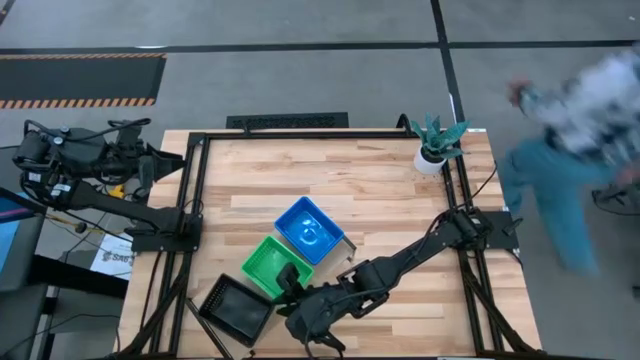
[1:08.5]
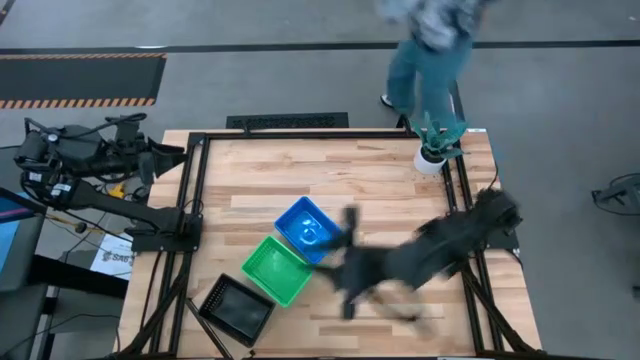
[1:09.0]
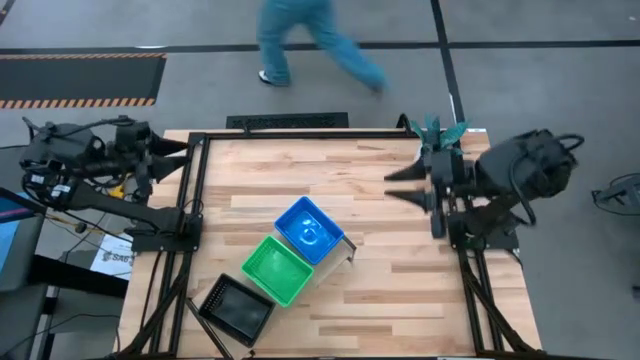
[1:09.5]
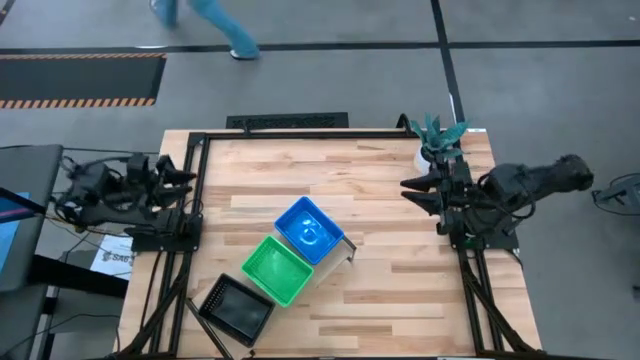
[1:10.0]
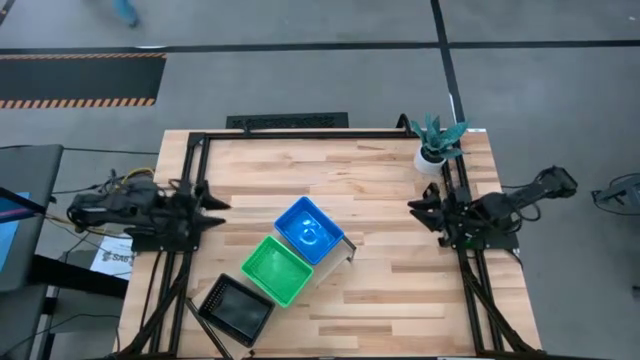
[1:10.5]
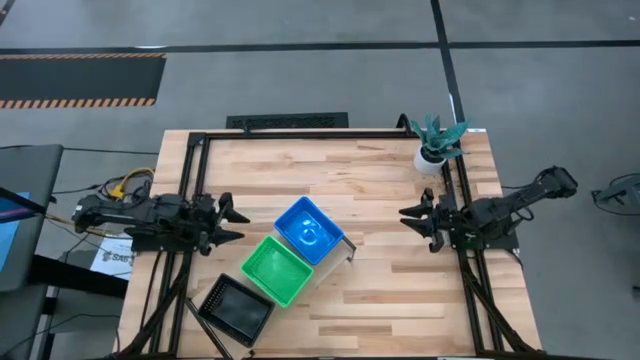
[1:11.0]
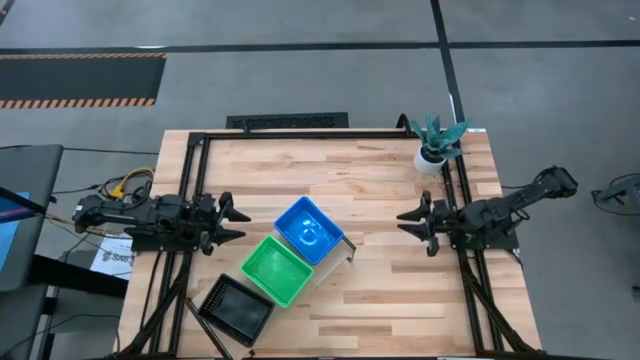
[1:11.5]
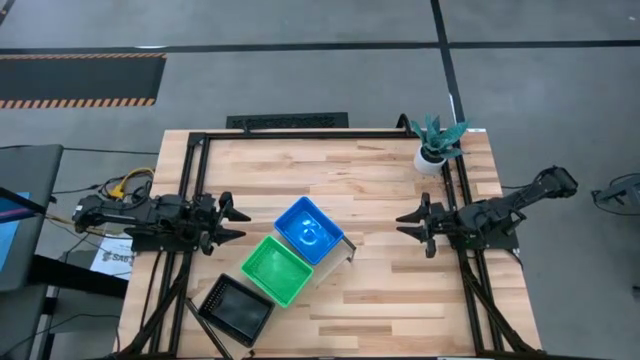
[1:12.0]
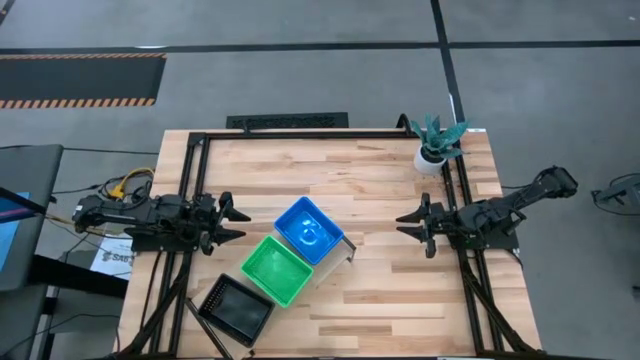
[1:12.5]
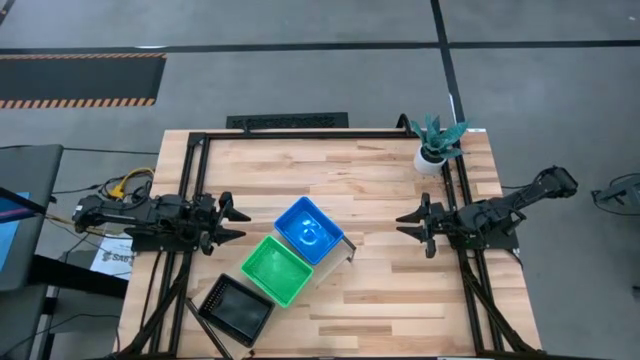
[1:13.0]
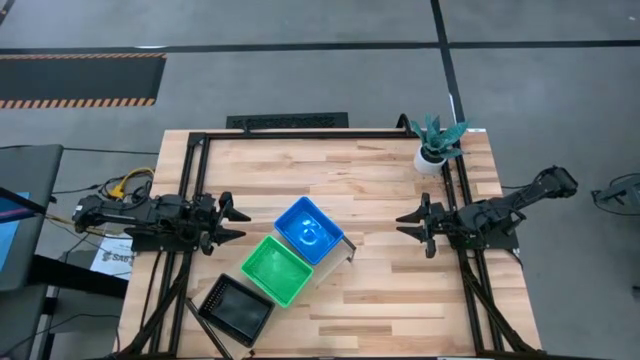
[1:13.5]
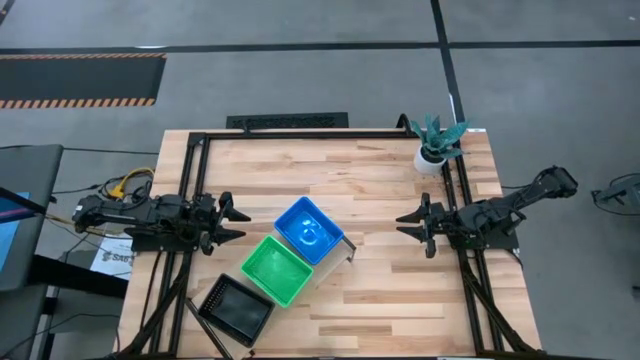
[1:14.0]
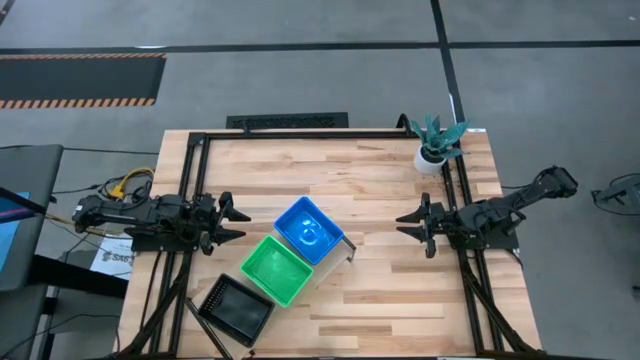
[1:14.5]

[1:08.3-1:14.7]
Task: Stack baskets on shelf by color
Return to Home Position

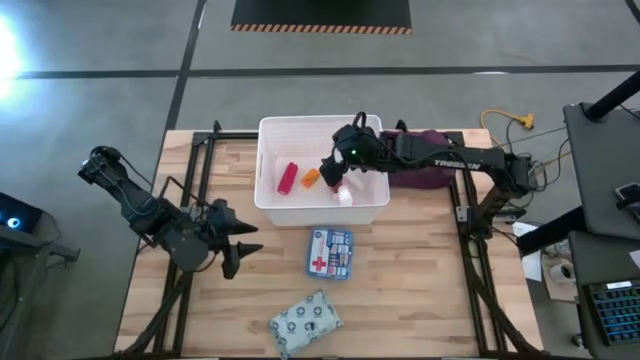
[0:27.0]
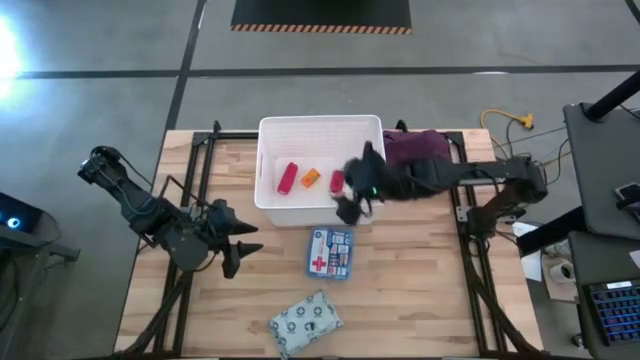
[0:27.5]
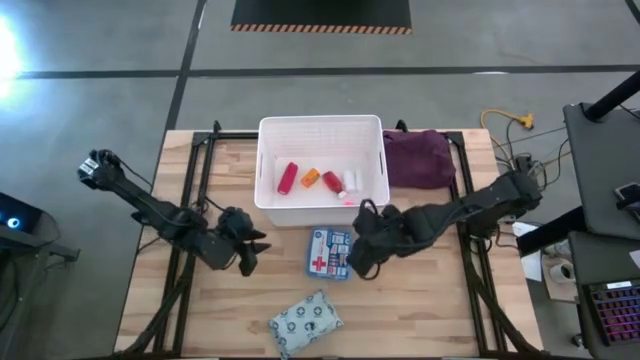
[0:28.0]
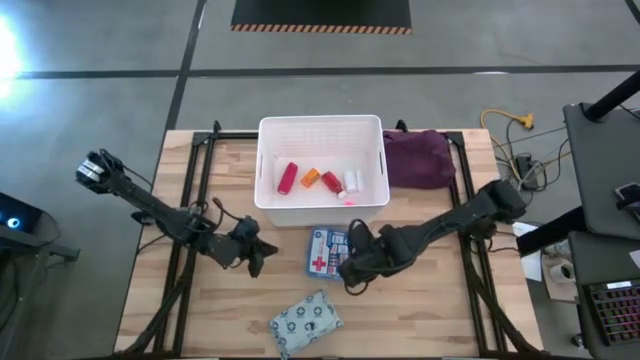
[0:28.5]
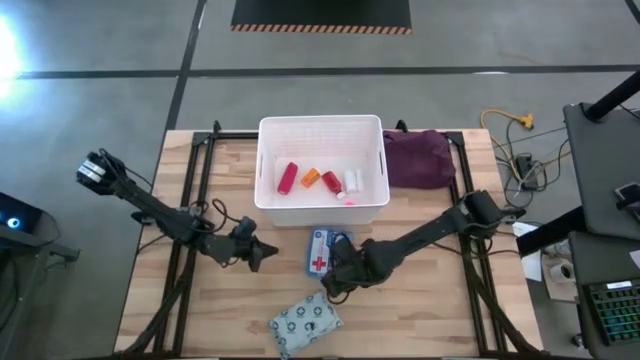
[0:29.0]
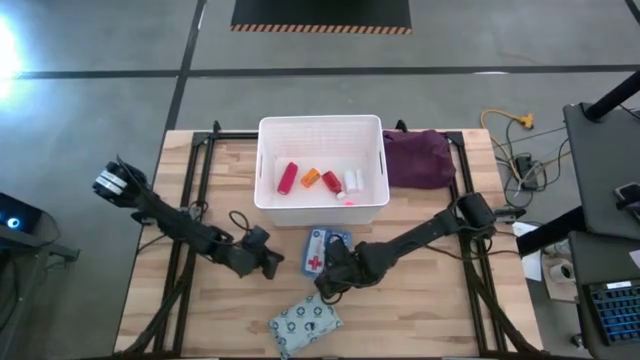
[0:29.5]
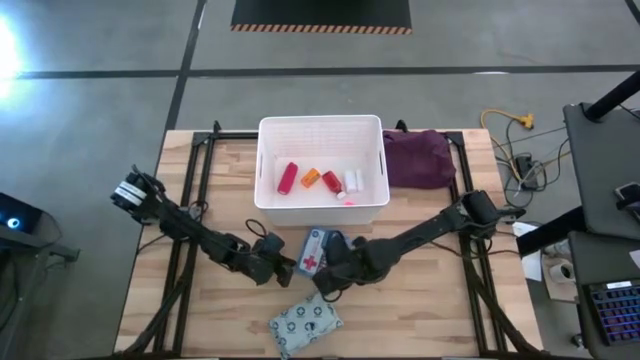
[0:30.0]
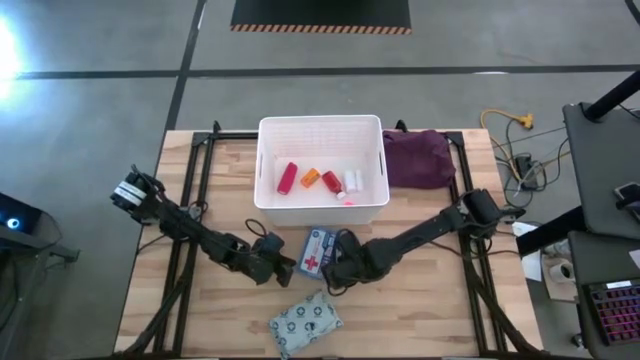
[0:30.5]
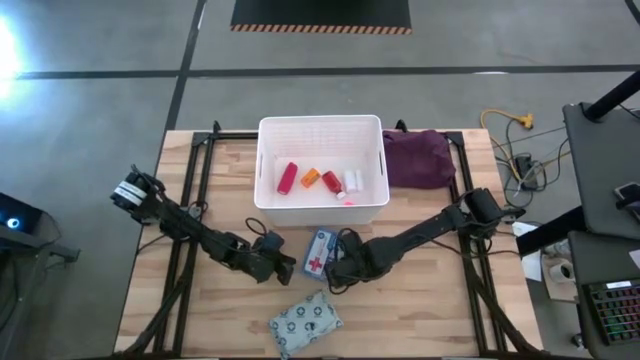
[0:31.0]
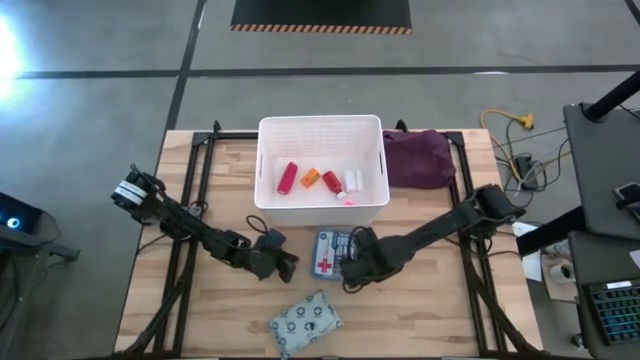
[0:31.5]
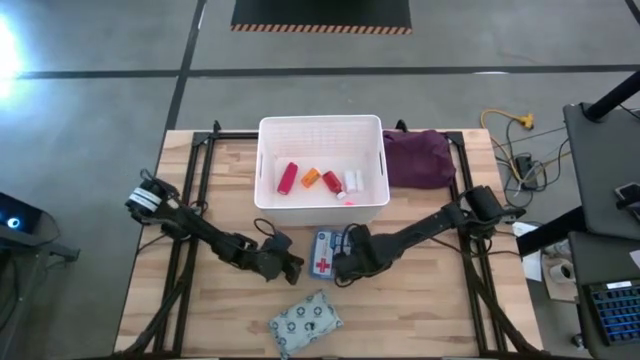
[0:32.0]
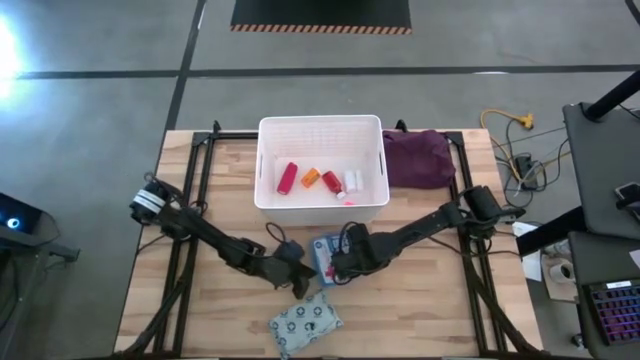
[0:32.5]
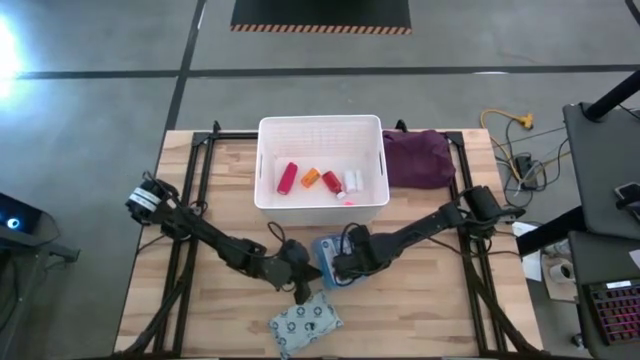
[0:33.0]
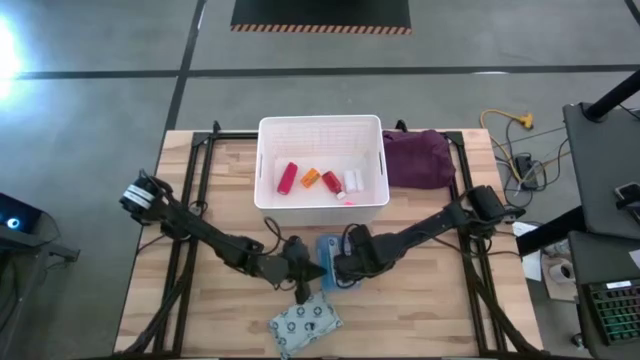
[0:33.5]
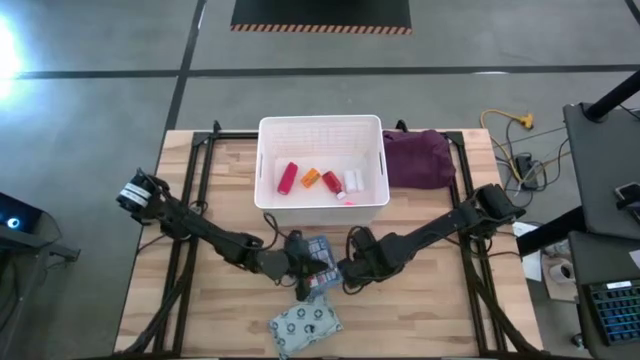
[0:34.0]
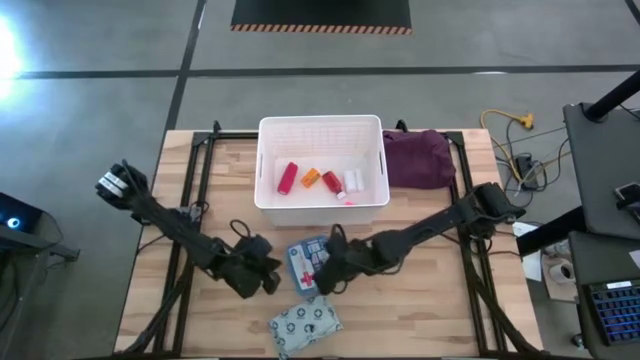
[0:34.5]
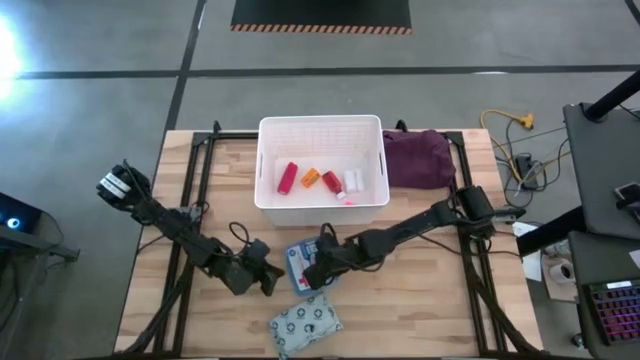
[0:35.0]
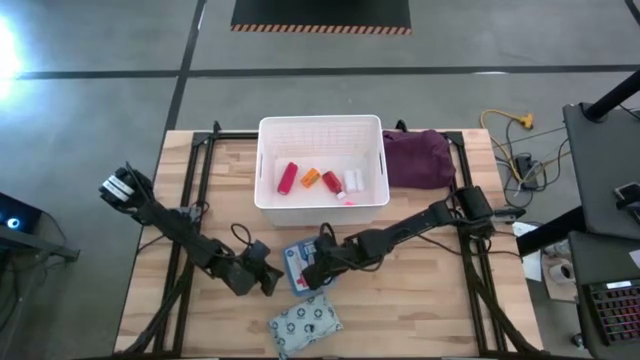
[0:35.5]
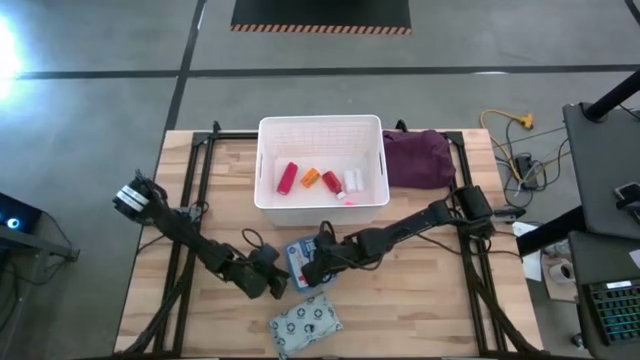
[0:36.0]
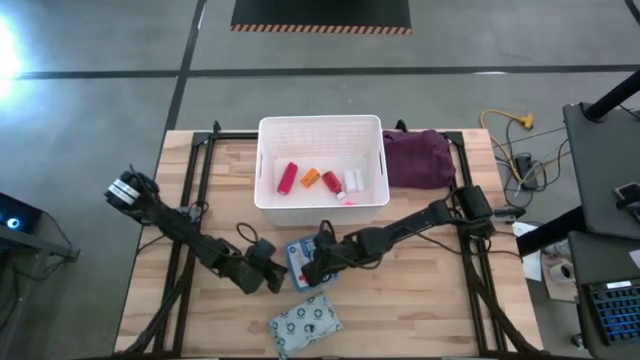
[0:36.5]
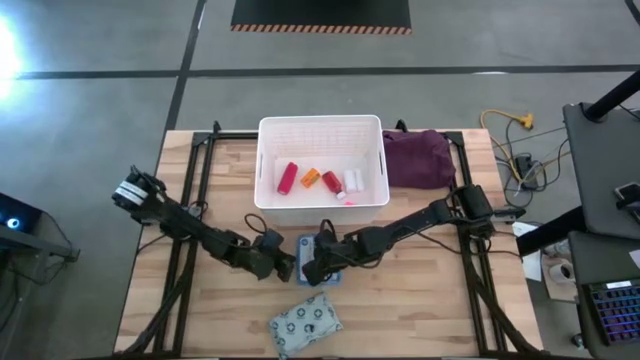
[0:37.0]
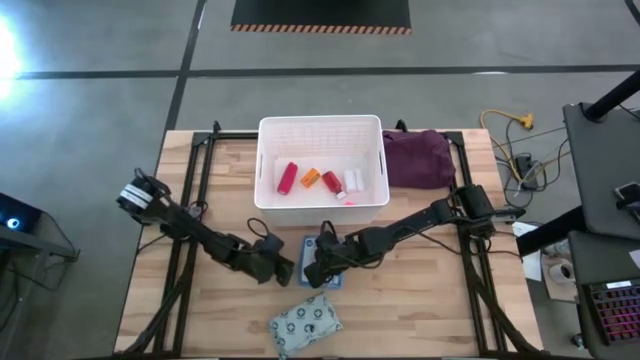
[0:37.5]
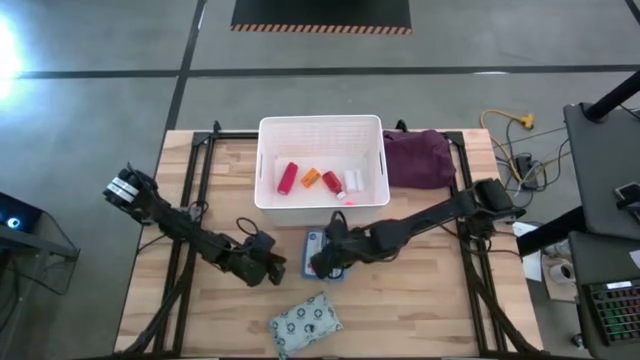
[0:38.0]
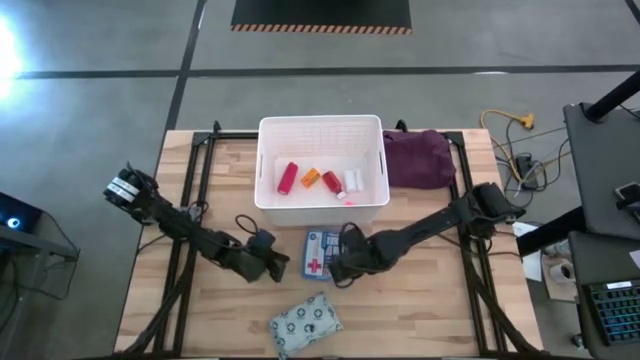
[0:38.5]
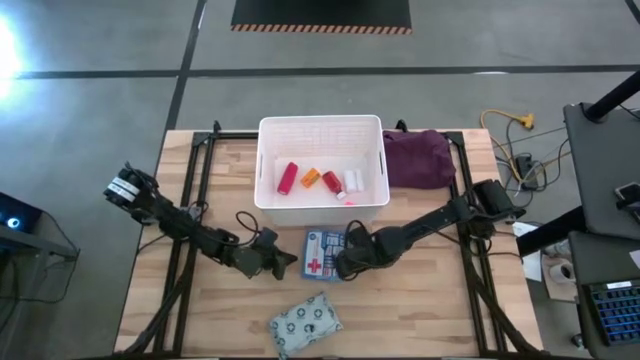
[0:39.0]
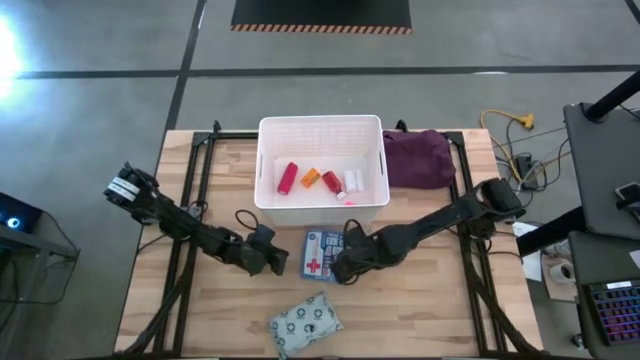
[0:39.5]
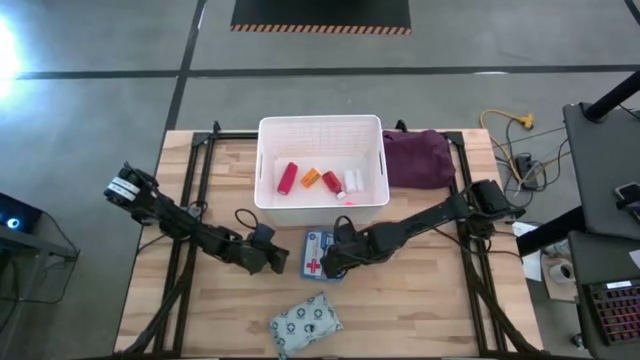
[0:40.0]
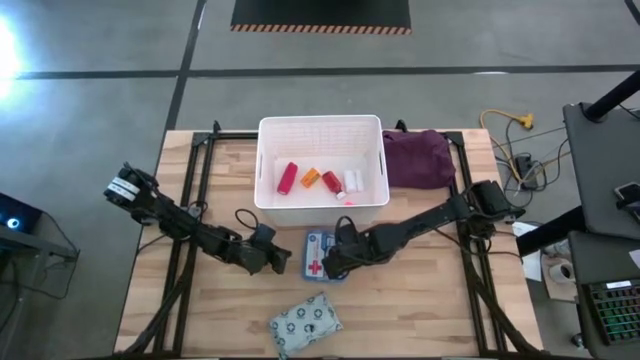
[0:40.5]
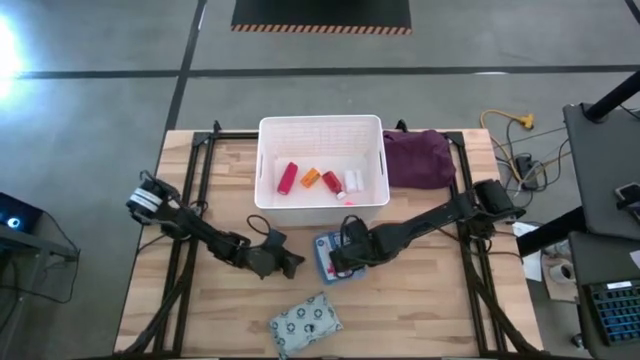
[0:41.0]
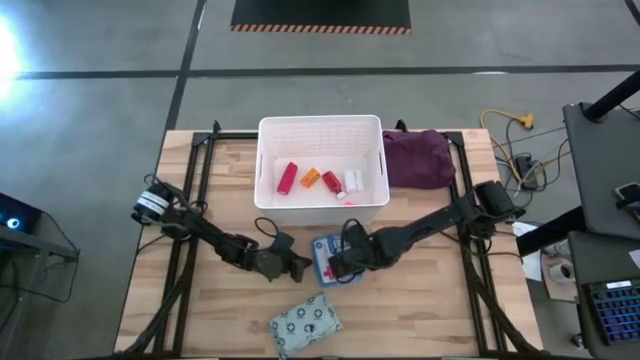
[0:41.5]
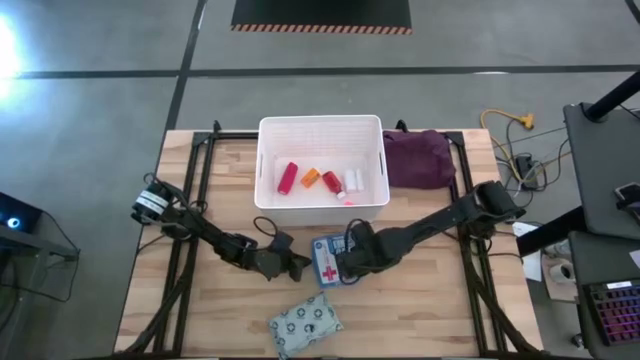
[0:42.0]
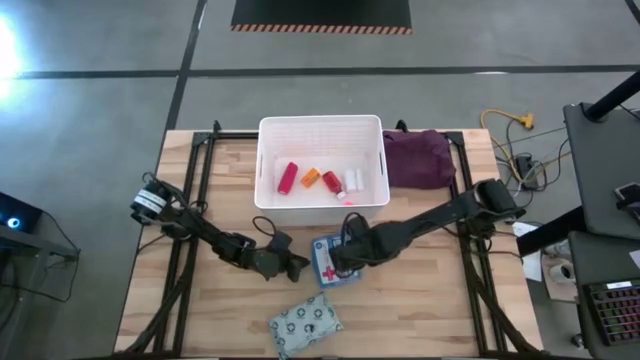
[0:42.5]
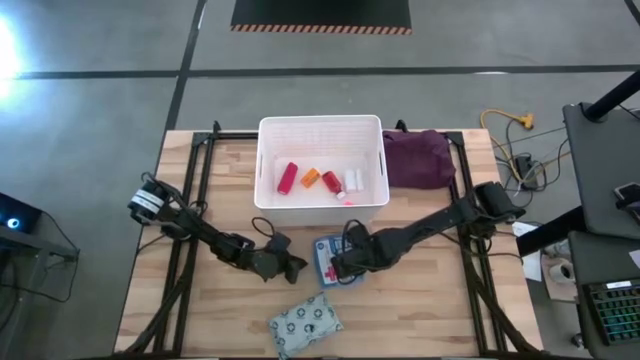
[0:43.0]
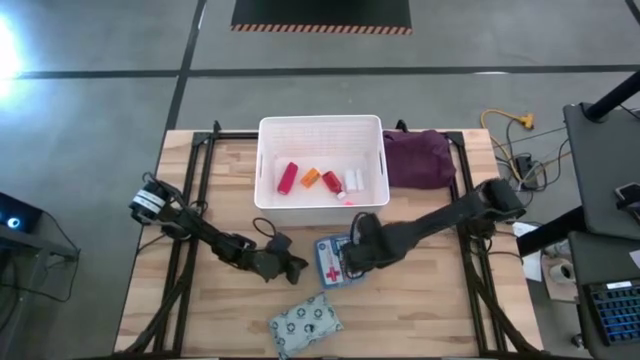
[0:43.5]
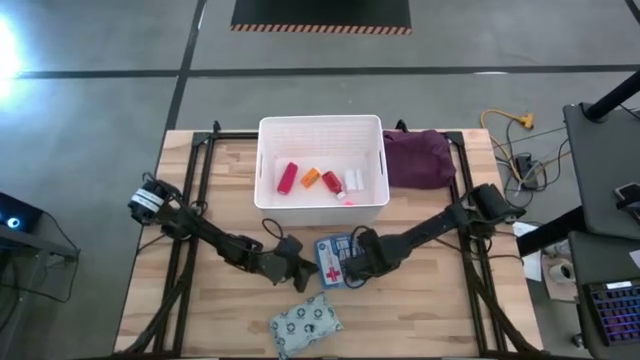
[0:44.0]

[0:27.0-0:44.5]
Task: Pick & place medical supplies in basket/bin
Put the blue first aid kit into the white bin
